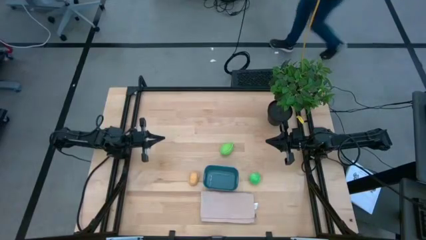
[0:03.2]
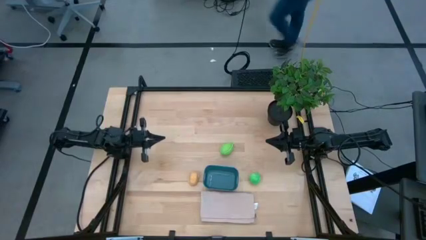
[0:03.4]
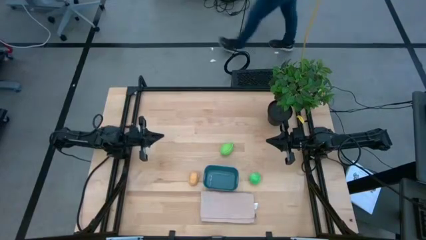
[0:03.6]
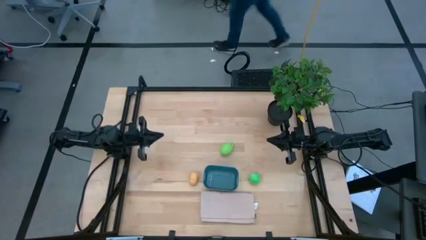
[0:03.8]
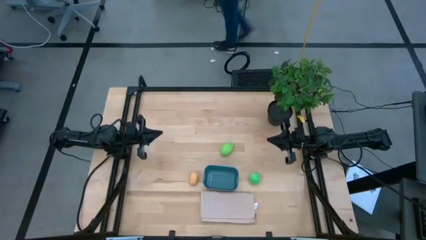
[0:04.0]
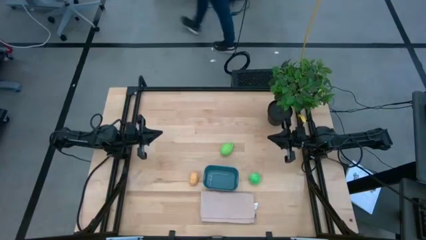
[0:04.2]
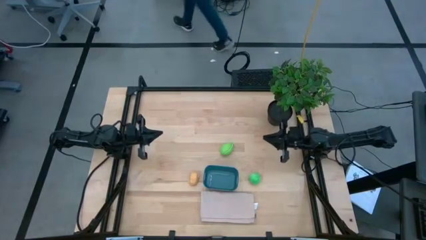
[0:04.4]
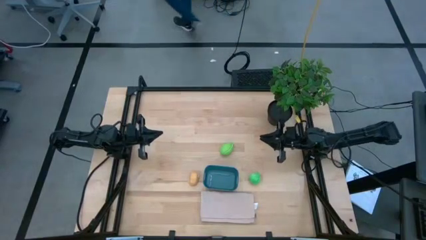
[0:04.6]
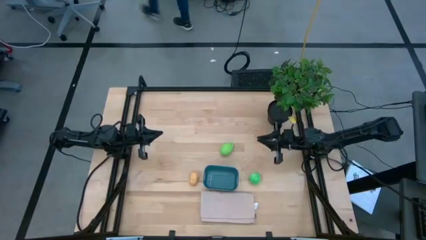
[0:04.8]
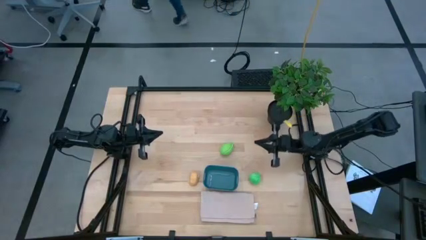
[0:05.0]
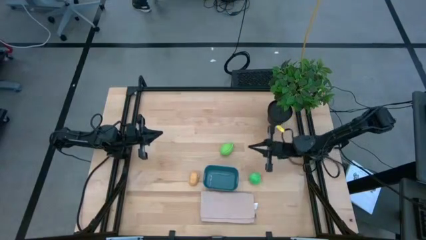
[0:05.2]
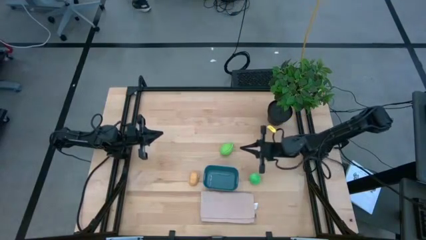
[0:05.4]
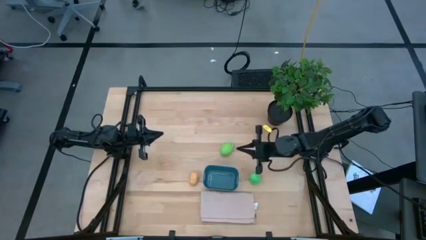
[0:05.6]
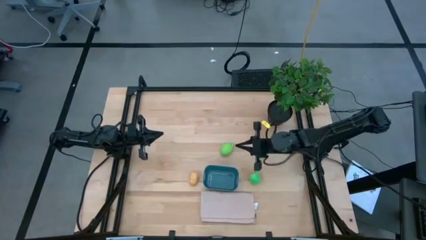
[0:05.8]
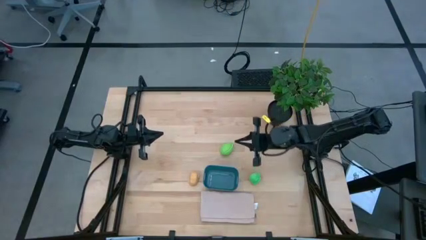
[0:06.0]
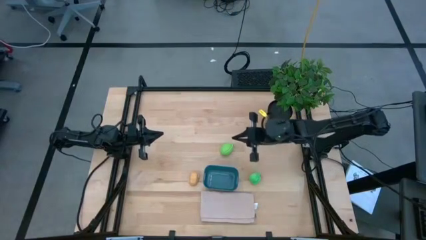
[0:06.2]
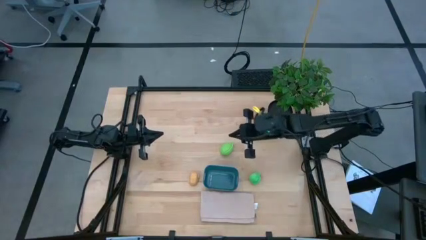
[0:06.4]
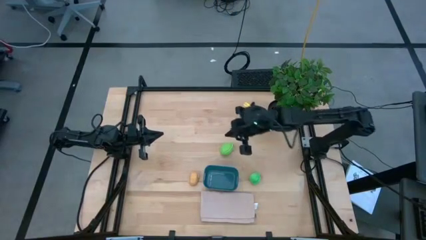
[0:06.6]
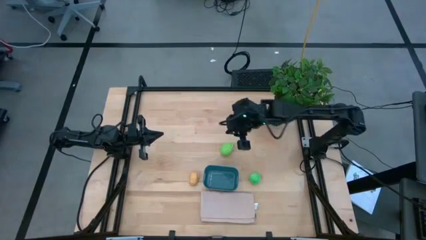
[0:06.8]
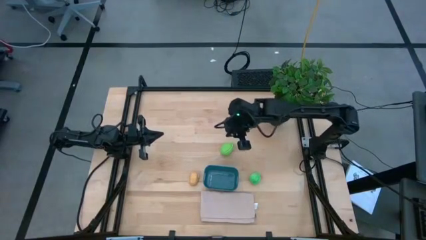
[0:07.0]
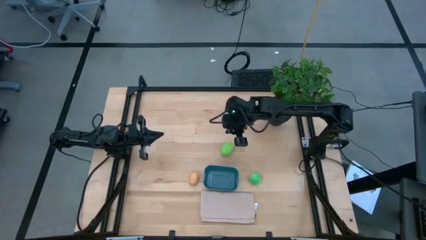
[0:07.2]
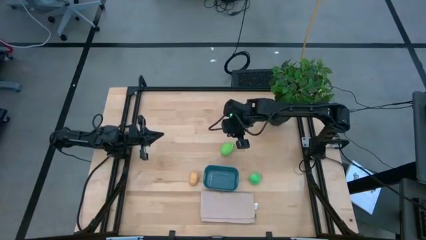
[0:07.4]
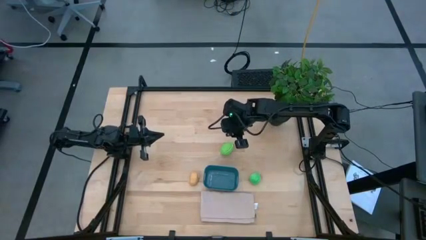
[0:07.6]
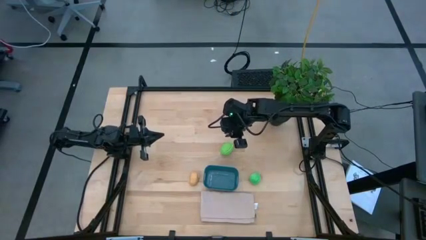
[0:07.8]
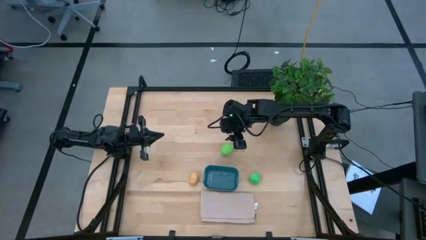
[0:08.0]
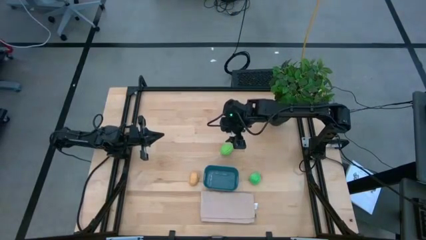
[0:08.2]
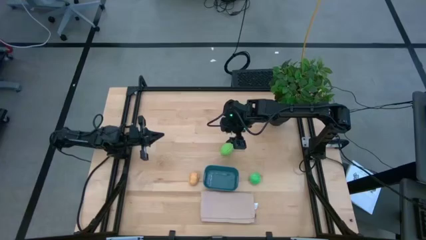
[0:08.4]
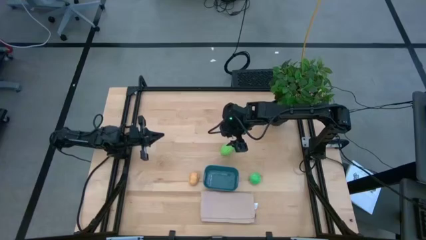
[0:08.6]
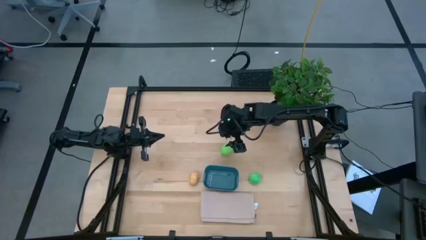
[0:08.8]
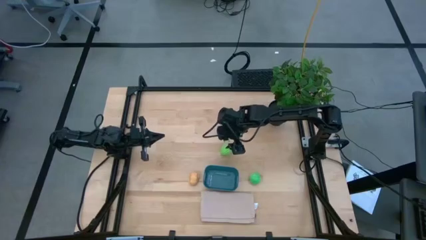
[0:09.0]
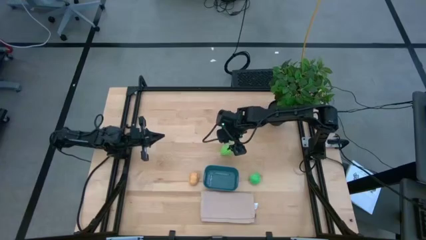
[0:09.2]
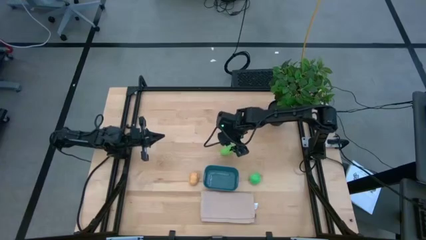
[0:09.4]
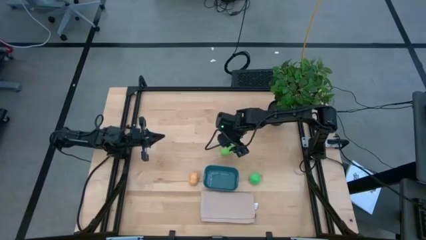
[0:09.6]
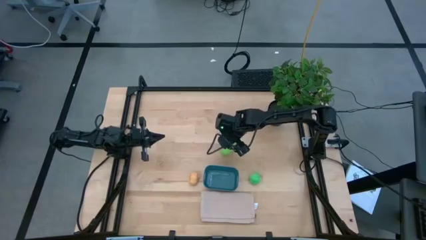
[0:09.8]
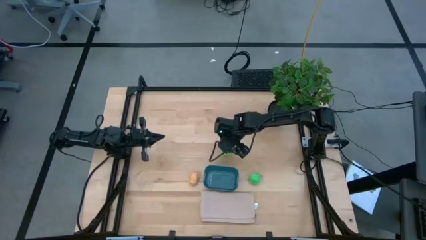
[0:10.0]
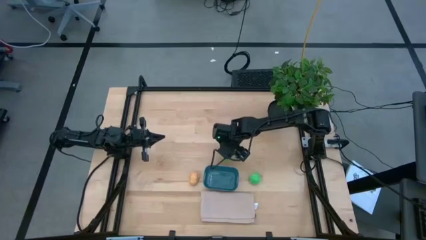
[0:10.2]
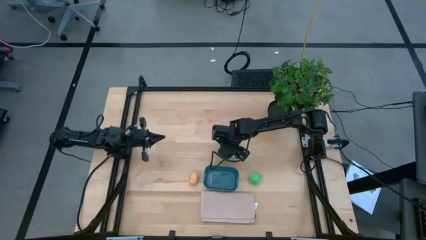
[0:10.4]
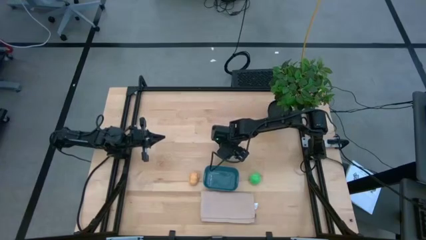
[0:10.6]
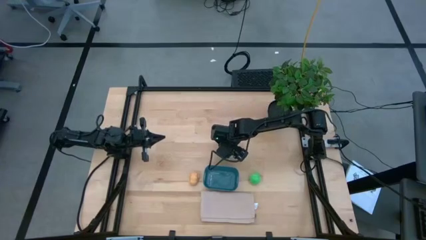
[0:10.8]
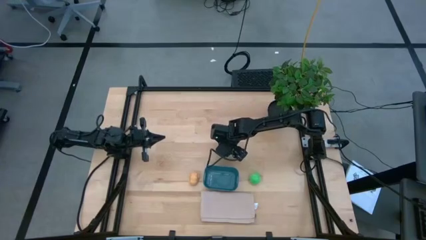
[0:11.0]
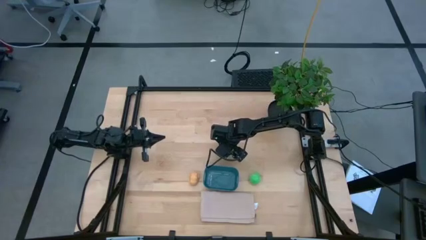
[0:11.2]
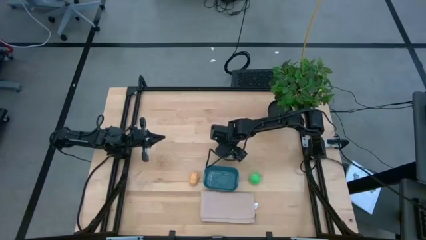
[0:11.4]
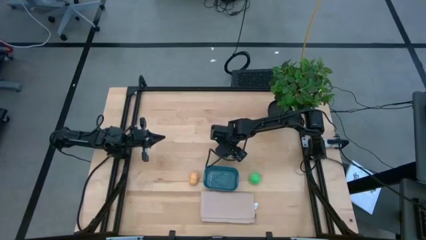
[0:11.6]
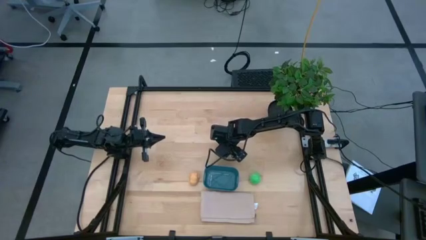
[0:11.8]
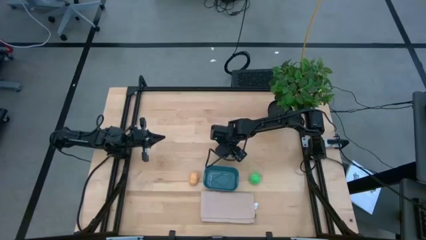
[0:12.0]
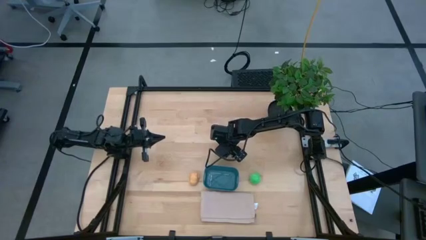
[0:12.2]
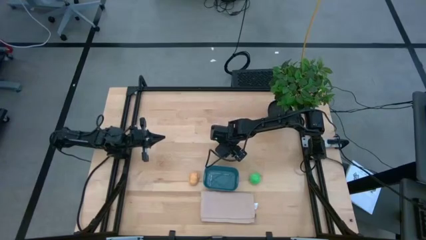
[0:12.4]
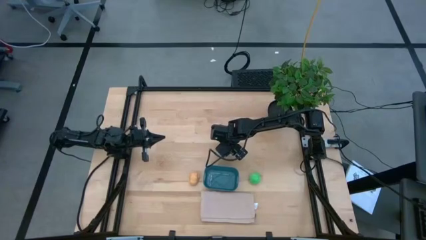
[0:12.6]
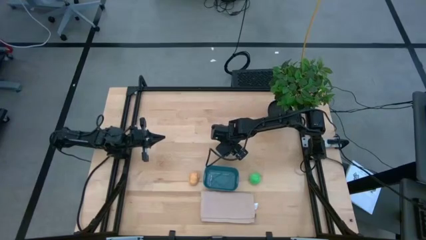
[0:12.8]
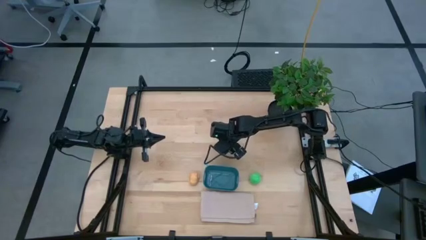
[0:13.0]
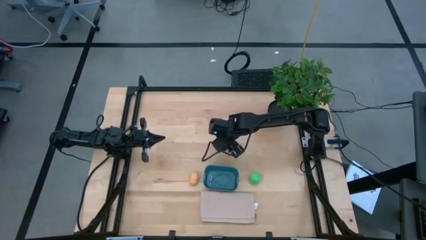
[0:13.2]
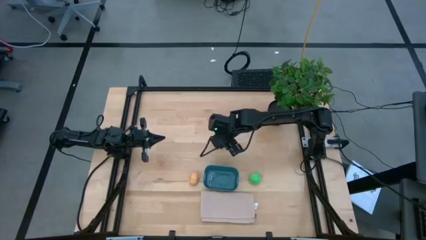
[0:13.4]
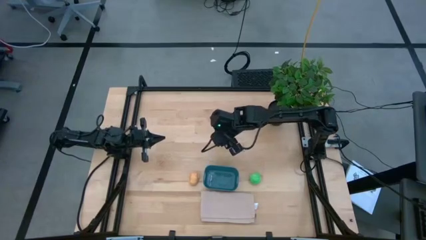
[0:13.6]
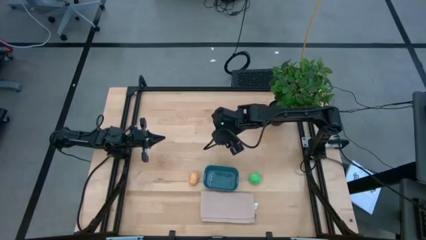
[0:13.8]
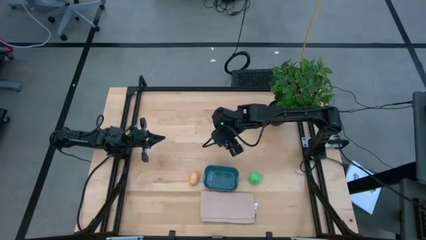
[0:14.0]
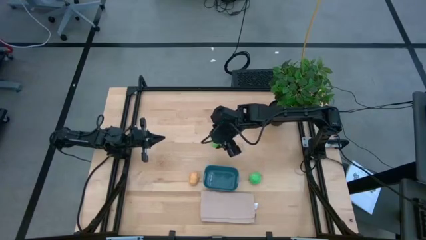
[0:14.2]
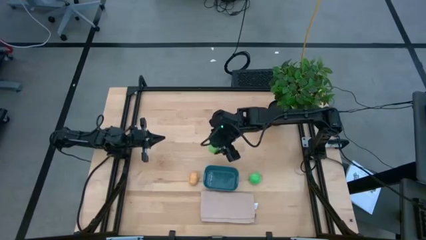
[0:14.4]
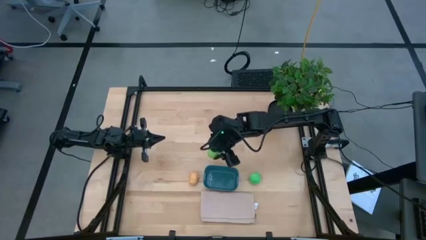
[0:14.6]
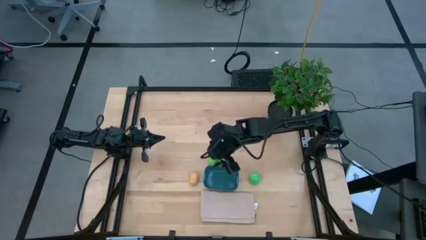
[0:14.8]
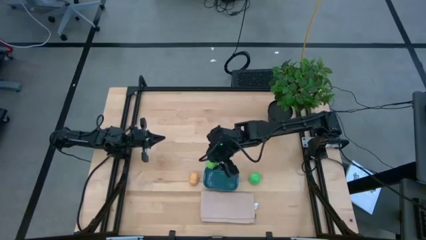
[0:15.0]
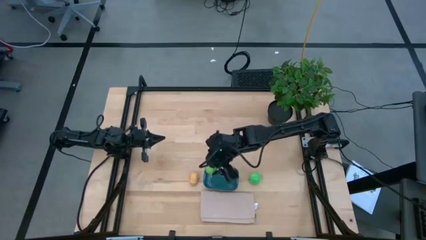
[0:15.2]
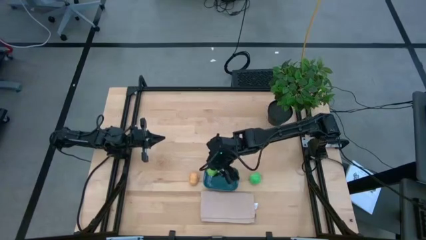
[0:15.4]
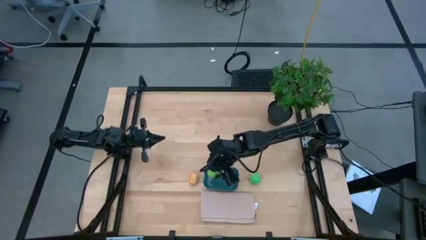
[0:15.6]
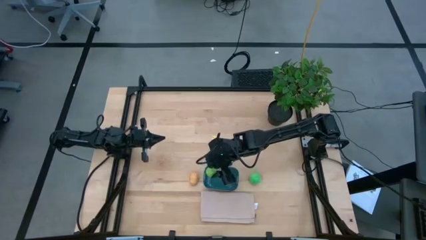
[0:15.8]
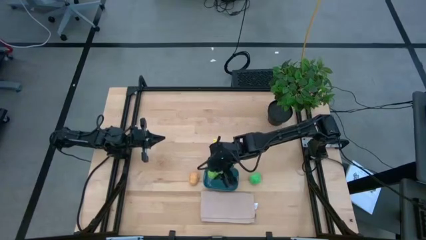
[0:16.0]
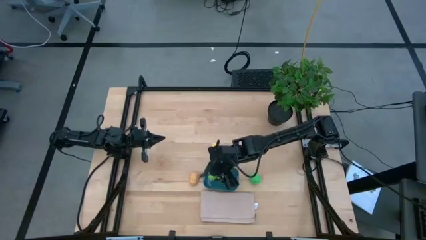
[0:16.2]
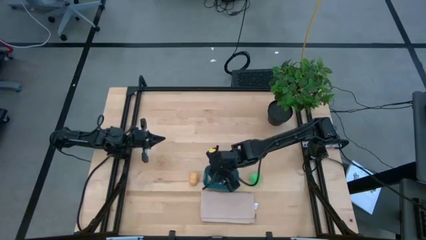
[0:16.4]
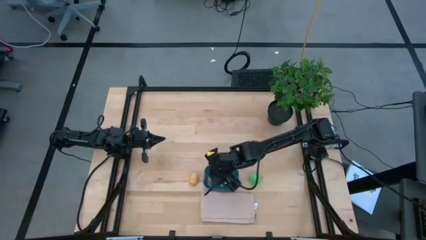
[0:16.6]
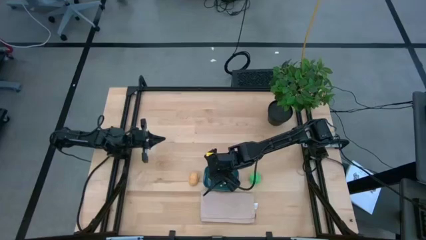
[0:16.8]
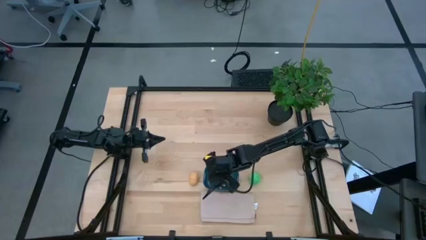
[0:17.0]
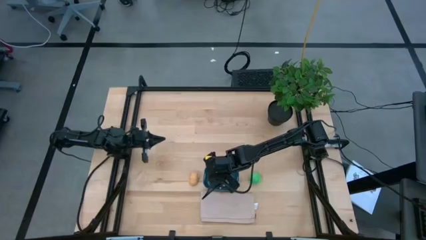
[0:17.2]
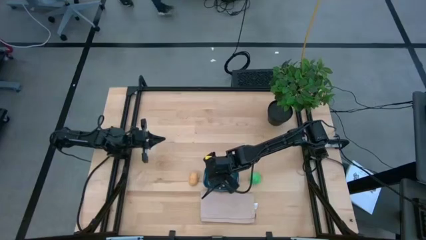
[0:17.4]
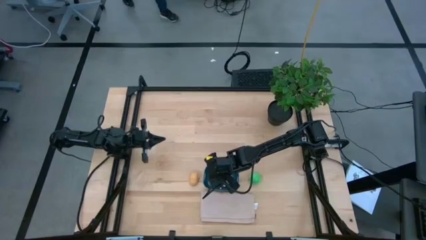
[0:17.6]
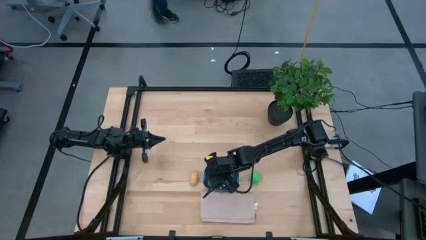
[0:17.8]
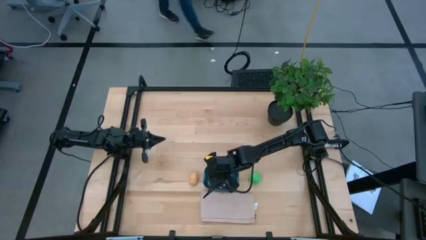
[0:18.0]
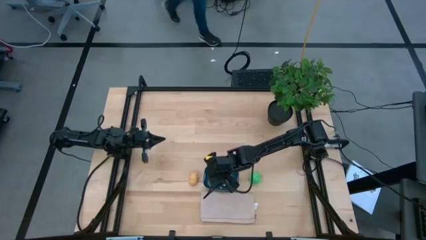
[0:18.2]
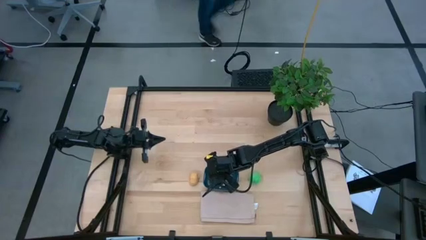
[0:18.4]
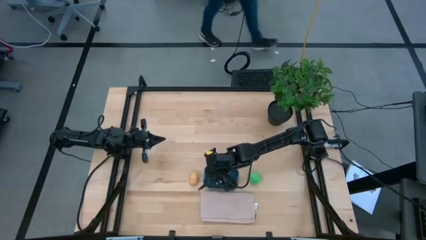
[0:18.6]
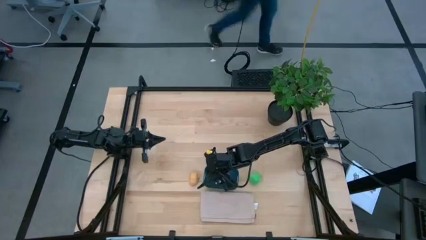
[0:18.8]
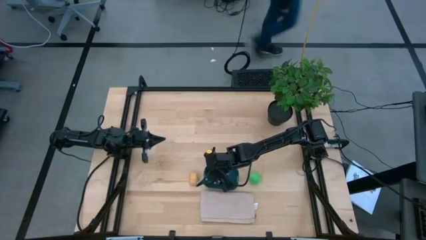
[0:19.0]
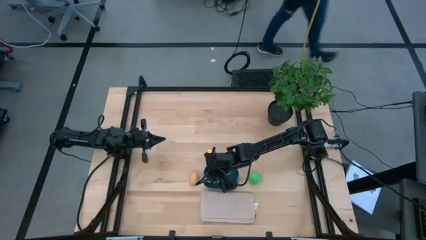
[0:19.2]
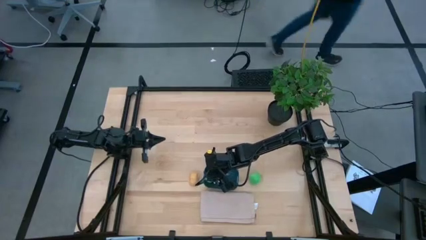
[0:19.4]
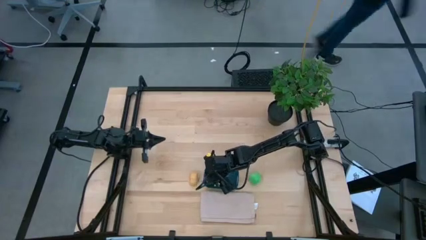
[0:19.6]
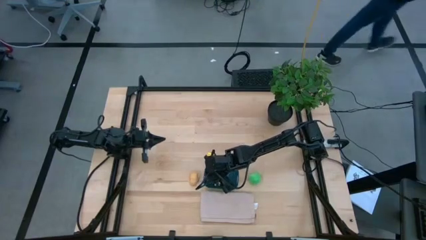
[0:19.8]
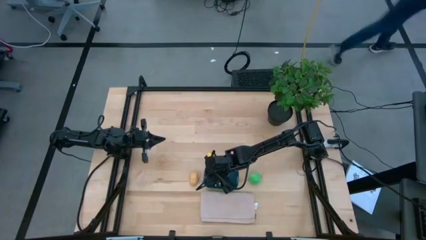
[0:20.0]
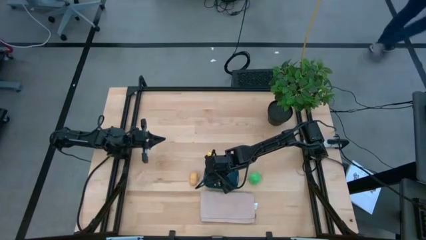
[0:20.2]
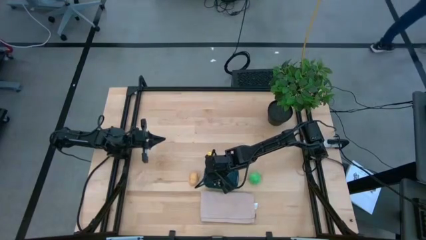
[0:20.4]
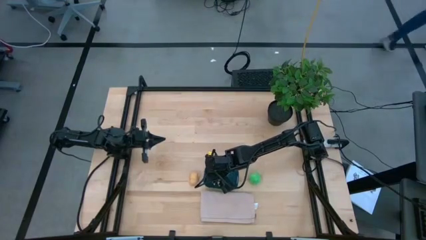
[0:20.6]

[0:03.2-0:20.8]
Task: Pick and placing Produce into tupperware
Put the green melon into the dark blue bin
